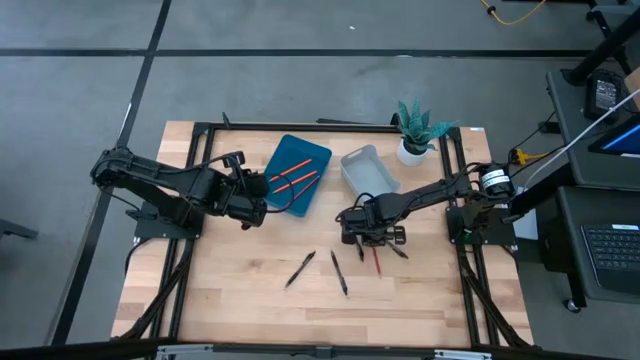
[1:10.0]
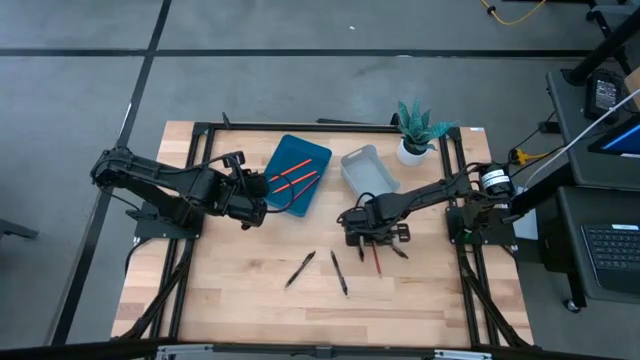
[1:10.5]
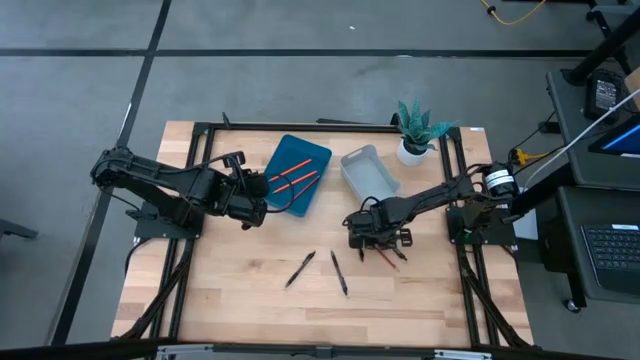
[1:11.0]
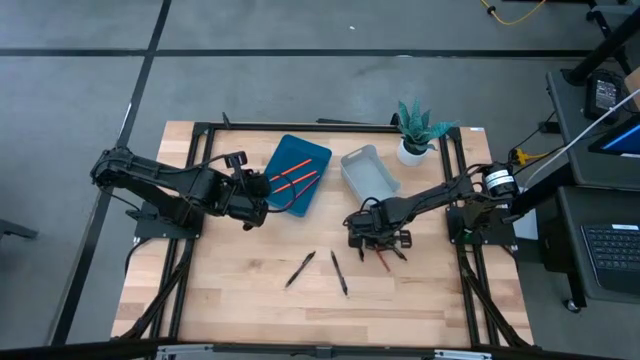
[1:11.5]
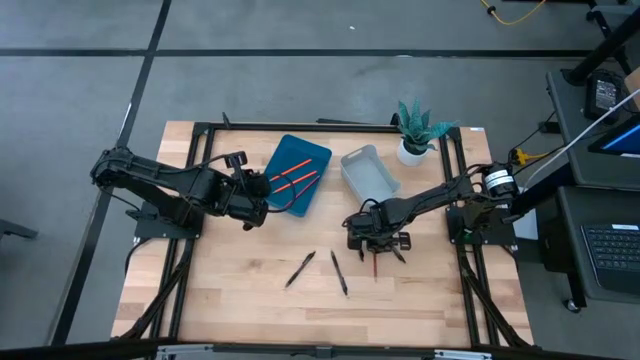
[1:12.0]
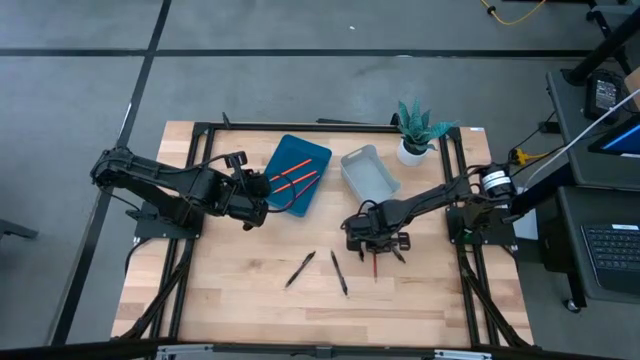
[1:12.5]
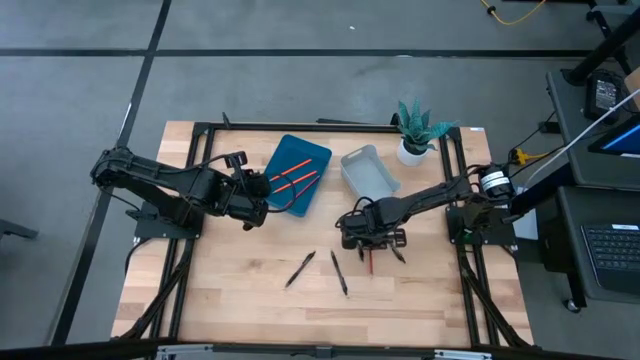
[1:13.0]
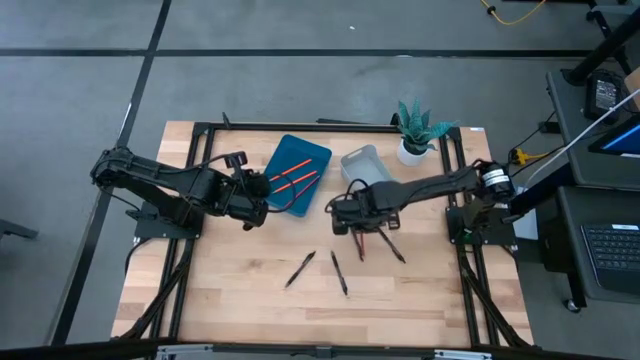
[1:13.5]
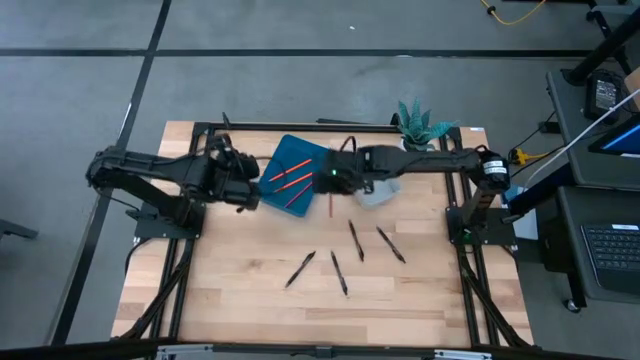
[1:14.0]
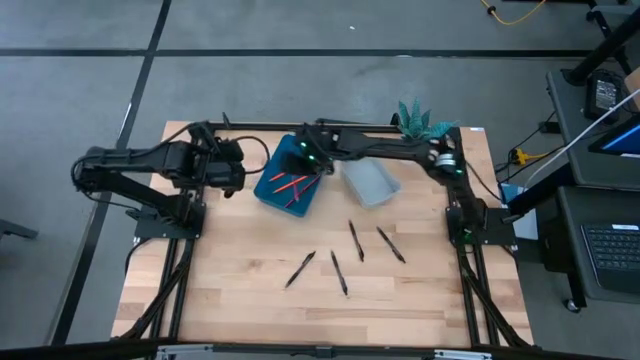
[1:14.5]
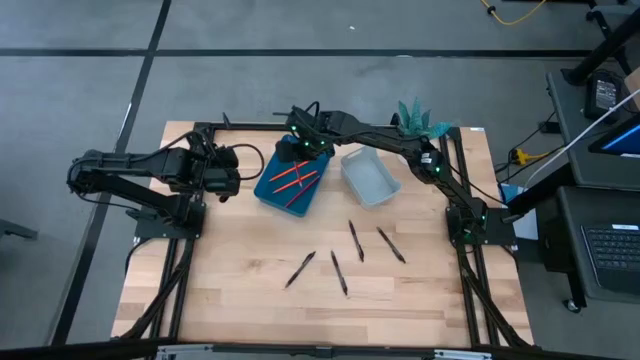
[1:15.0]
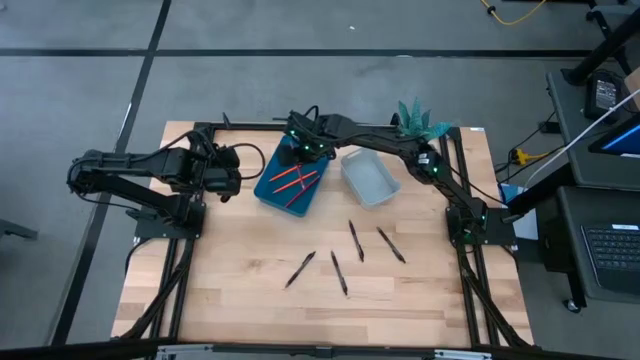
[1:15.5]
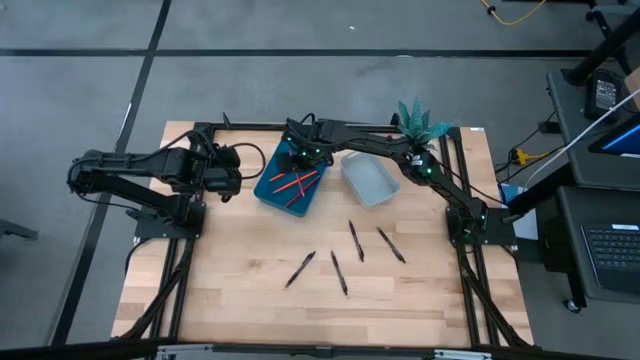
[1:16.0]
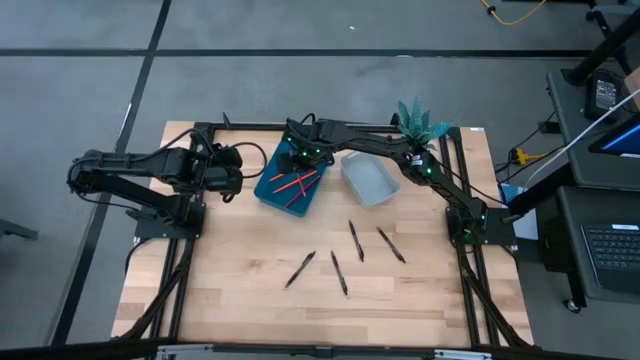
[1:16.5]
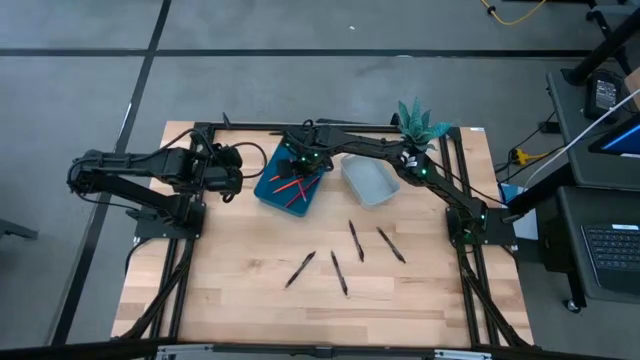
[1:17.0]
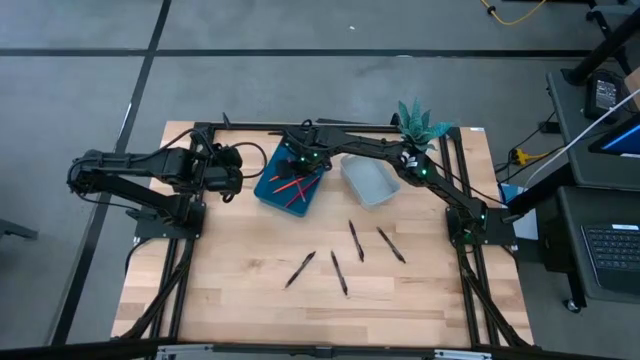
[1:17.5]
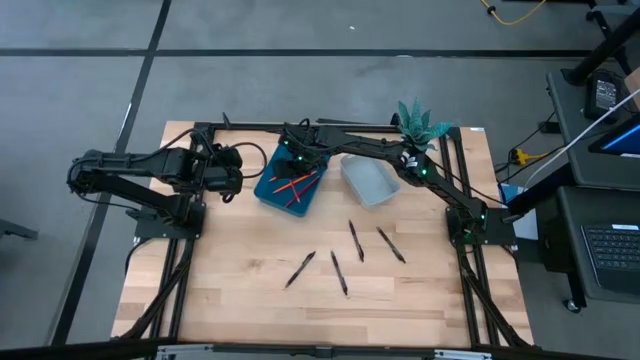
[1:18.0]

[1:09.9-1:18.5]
Task: Sort pens & pencils
Put the red pencil into the blue bin

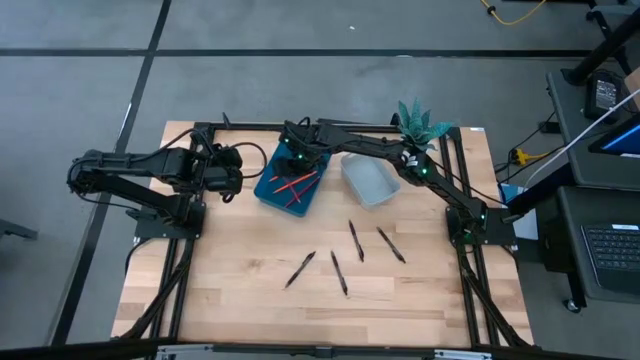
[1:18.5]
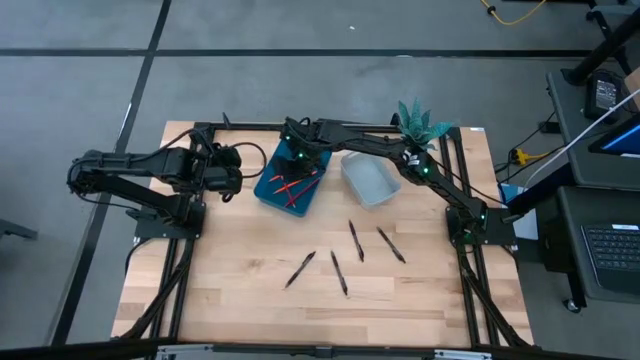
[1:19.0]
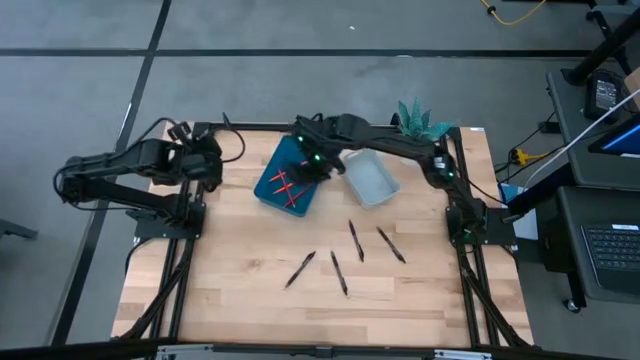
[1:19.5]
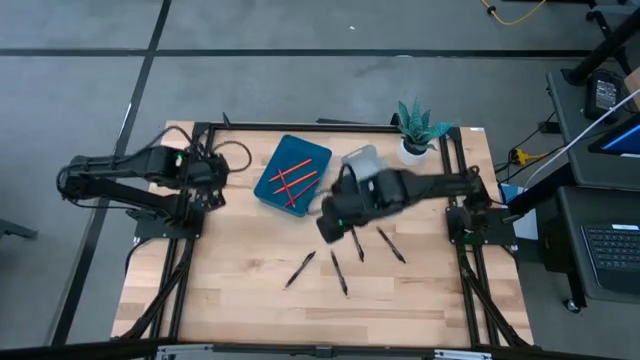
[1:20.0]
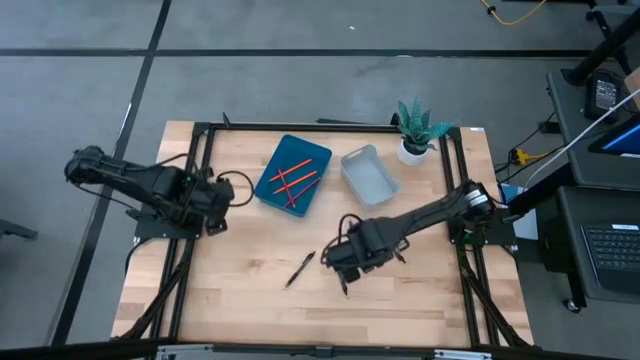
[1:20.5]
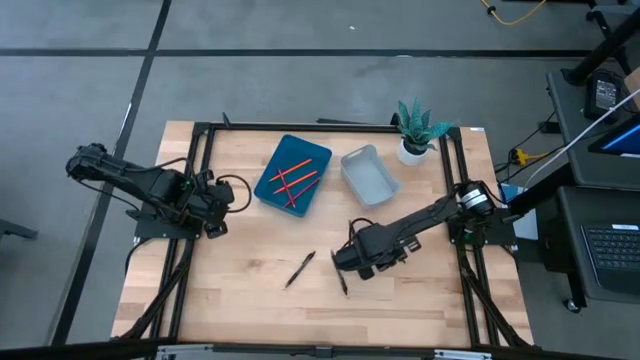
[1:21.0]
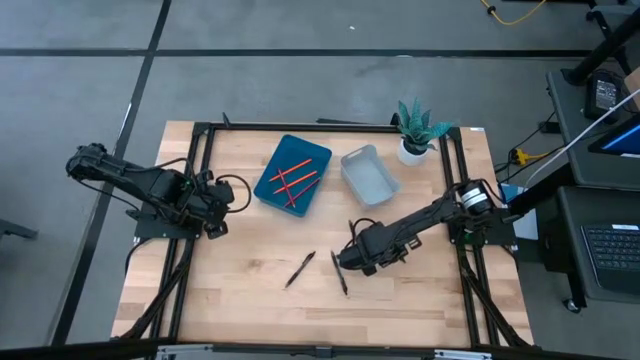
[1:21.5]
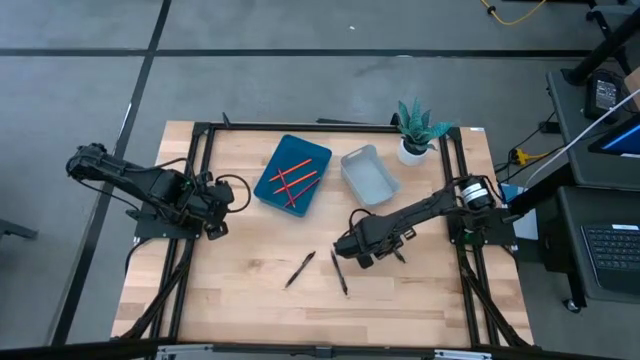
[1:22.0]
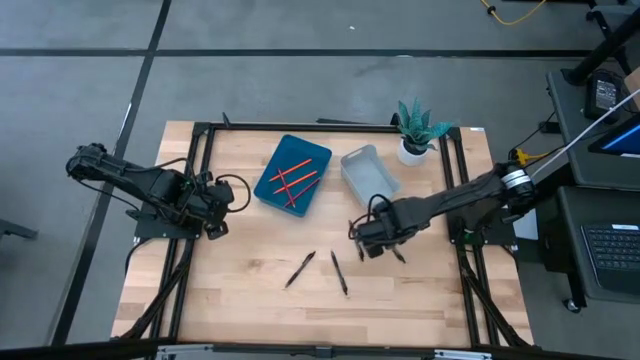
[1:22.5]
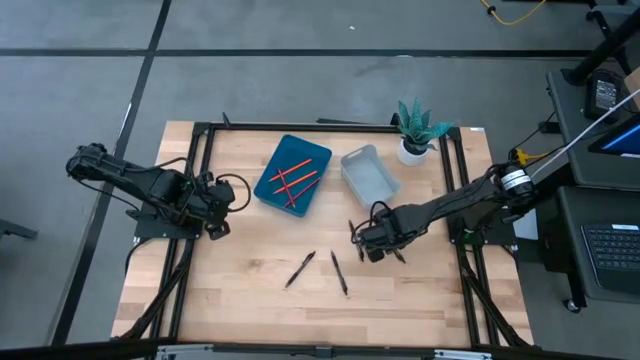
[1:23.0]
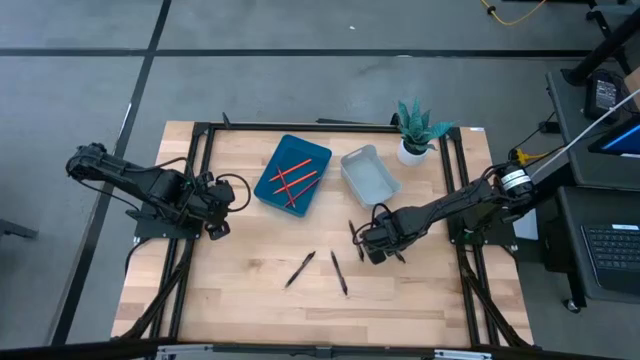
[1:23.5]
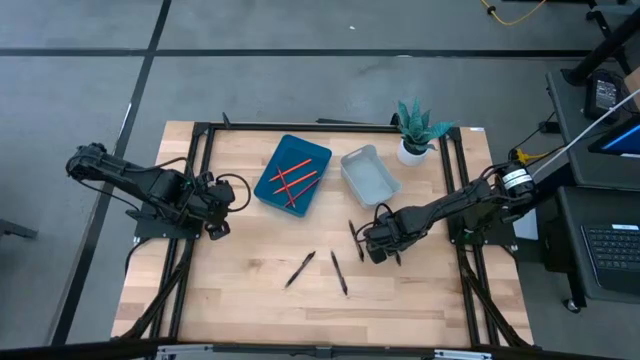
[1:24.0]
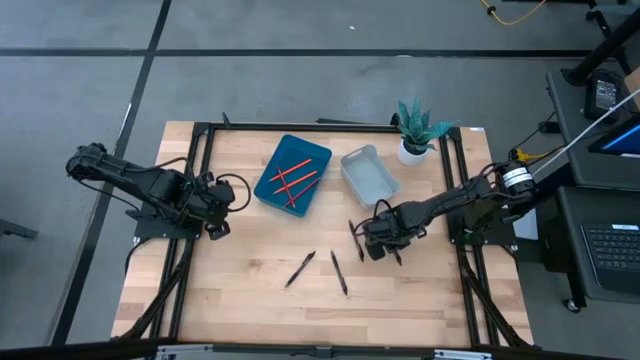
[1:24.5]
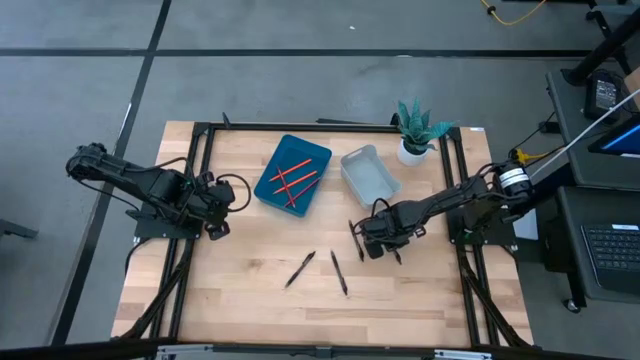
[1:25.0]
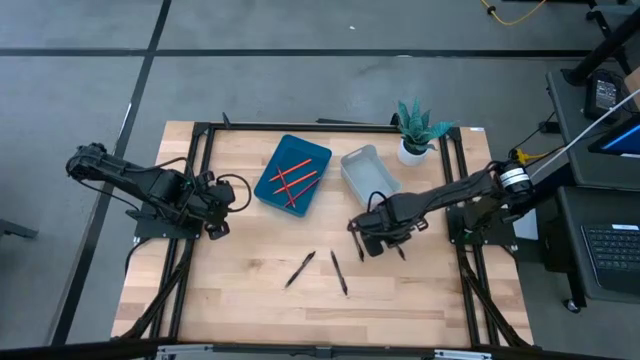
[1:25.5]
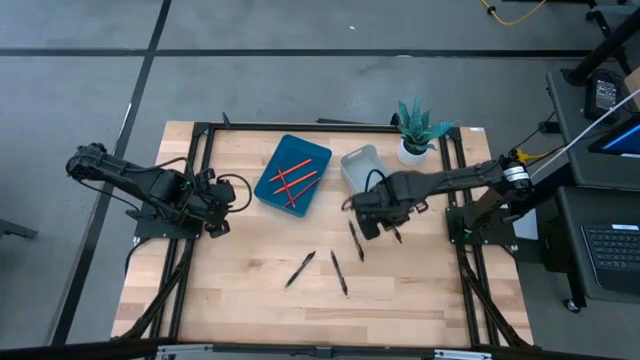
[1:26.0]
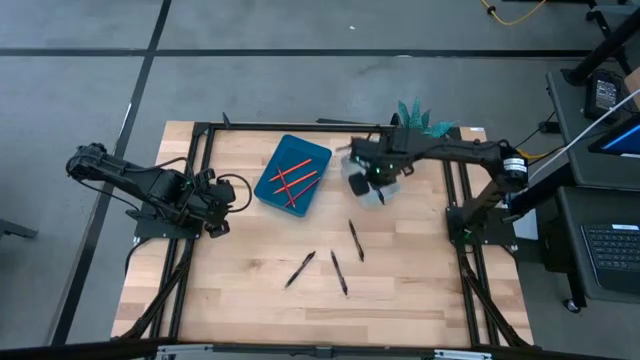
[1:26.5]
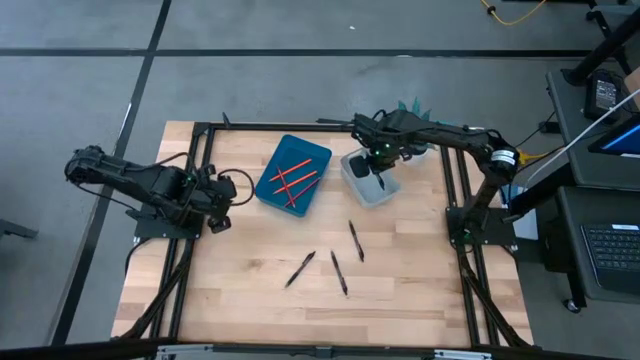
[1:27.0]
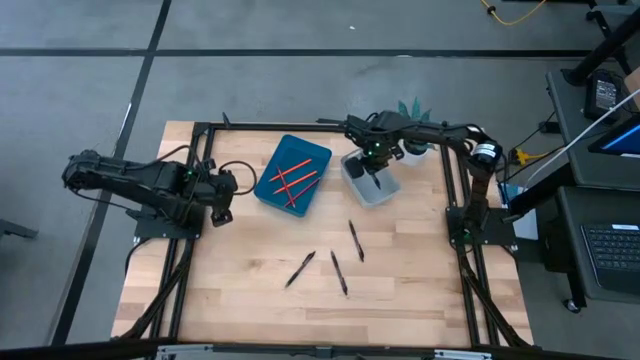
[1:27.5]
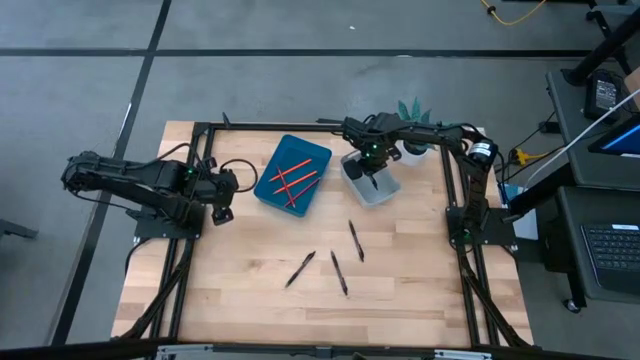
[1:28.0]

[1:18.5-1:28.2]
Put the black pen into the gray bin

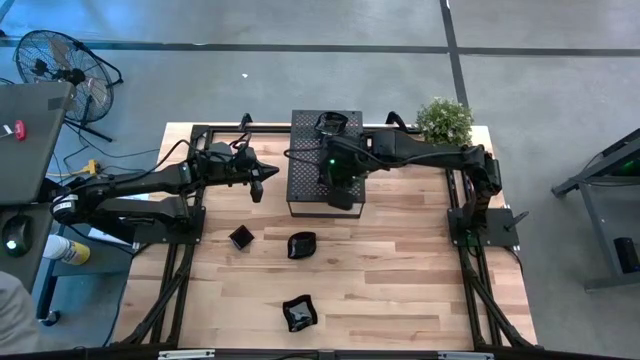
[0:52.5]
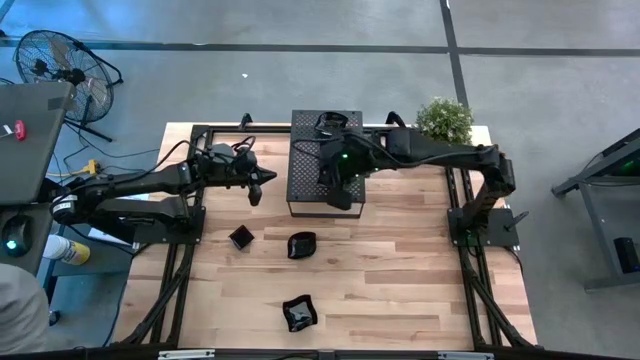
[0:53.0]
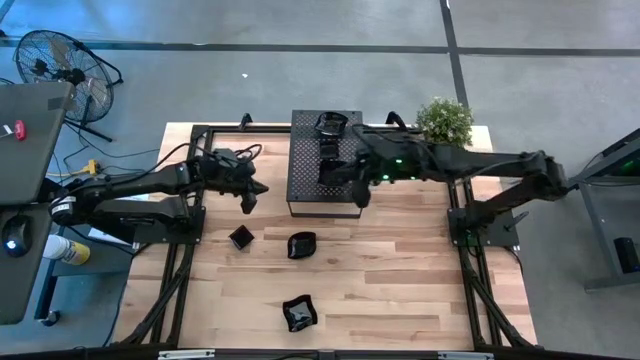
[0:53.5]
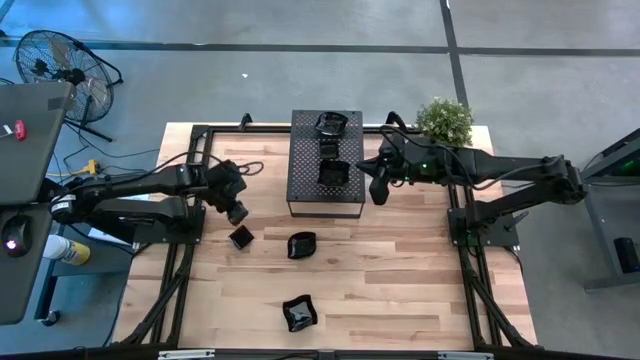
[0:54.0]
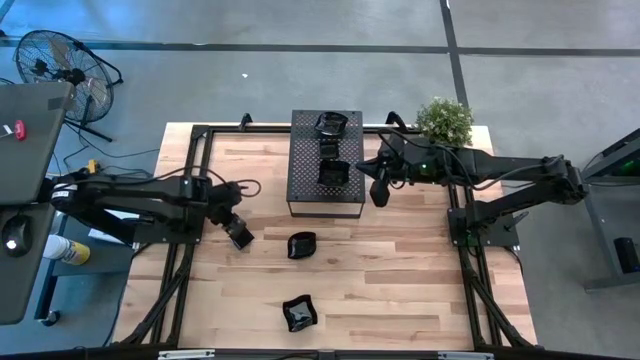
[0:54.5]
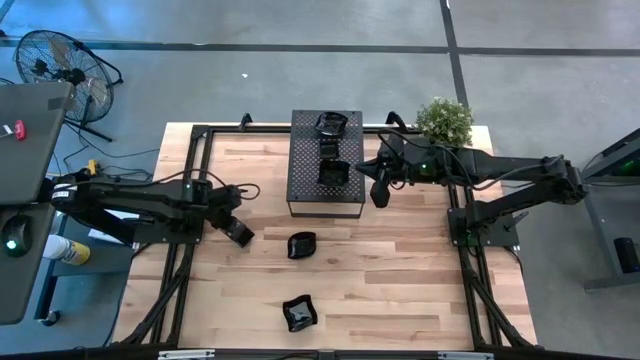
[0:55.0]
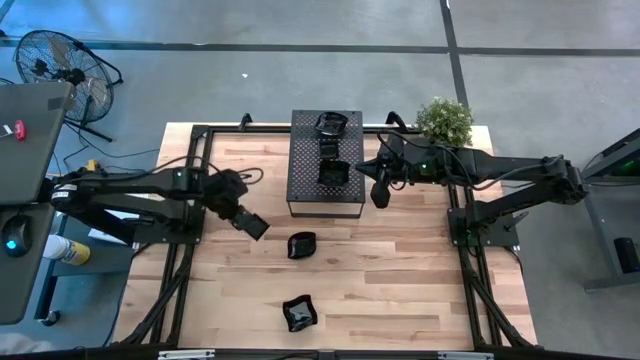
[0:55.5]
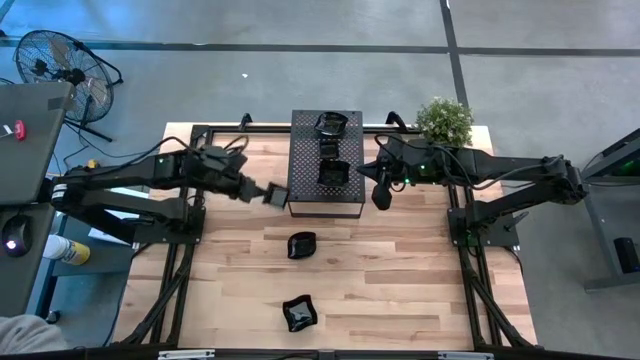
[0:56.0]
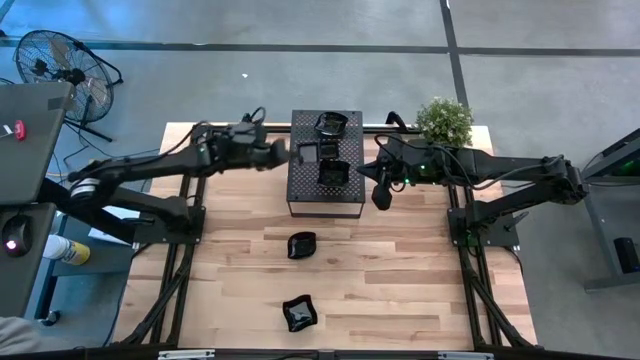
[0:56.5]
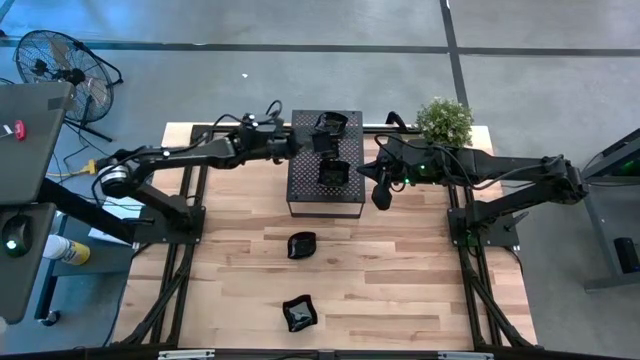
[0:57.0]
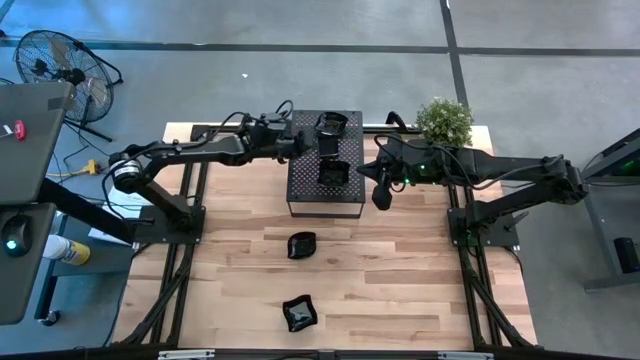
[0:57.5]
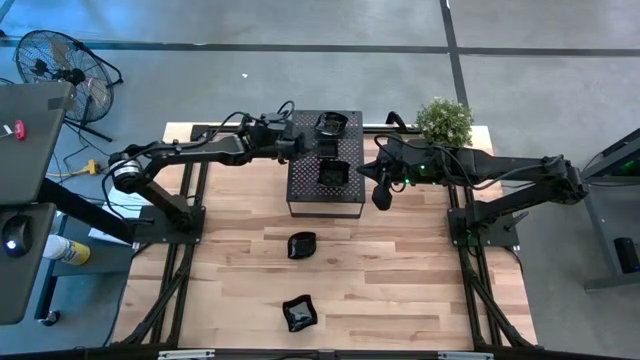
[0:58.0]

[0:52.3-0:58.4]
Task: Pick & Place Mini shaped plates
Stack the square plate on top of the stacked square plates on the shelf
